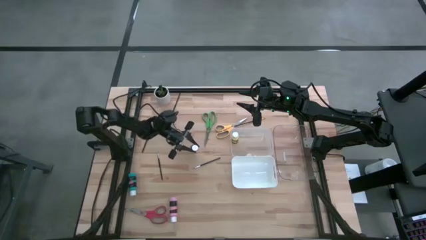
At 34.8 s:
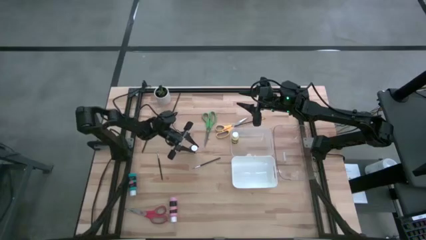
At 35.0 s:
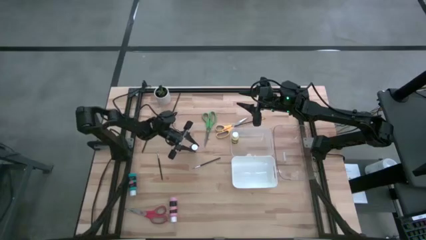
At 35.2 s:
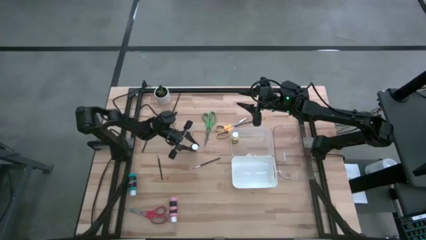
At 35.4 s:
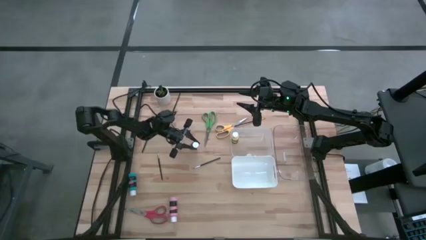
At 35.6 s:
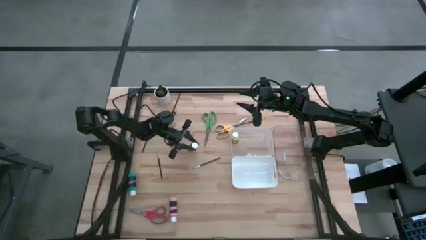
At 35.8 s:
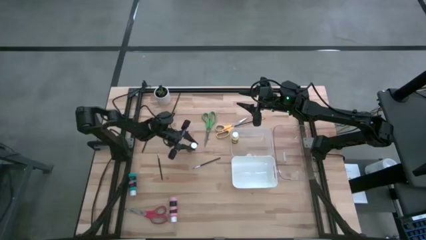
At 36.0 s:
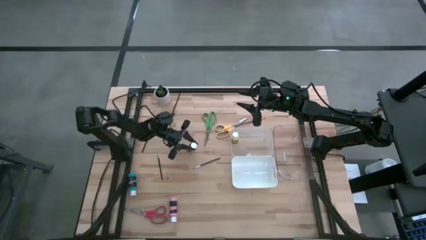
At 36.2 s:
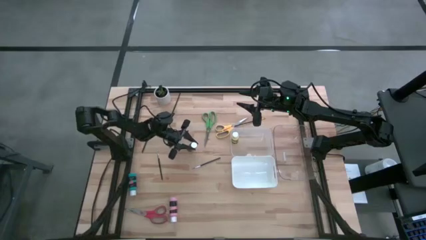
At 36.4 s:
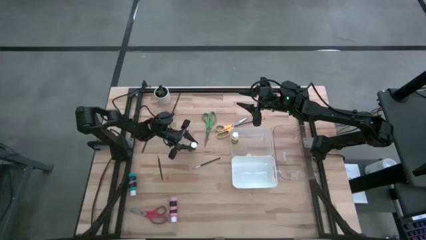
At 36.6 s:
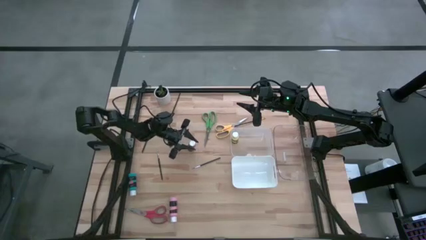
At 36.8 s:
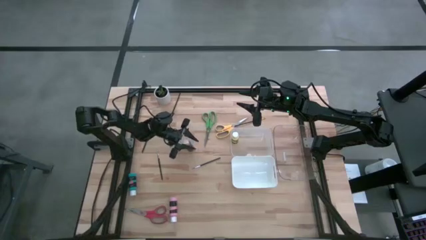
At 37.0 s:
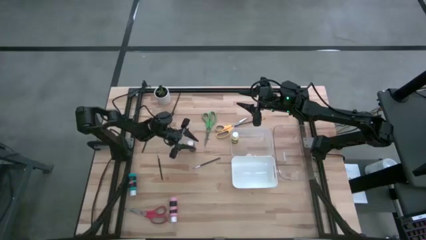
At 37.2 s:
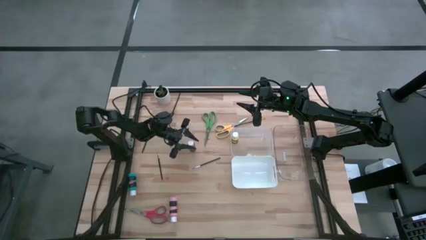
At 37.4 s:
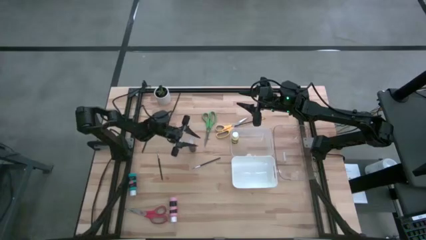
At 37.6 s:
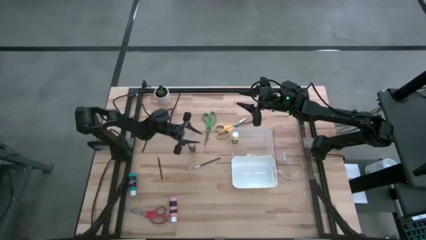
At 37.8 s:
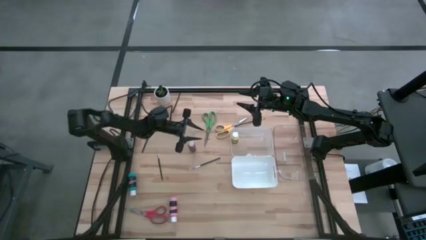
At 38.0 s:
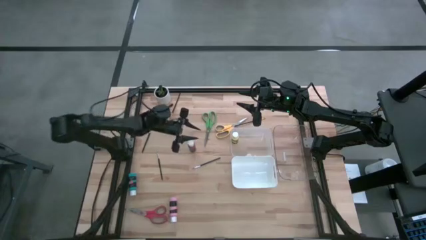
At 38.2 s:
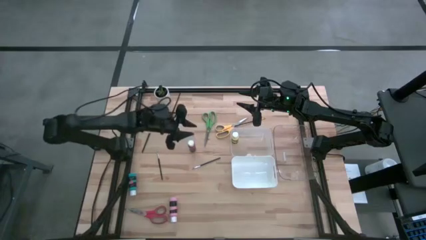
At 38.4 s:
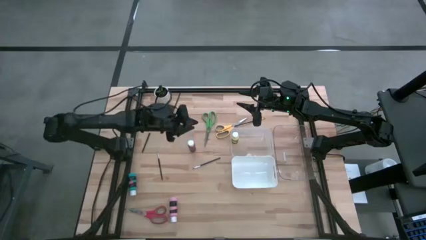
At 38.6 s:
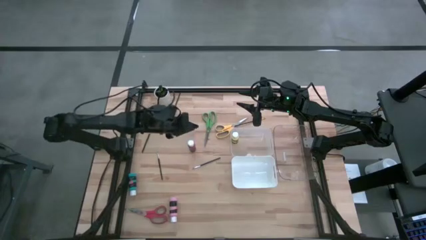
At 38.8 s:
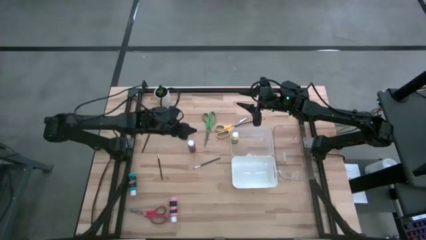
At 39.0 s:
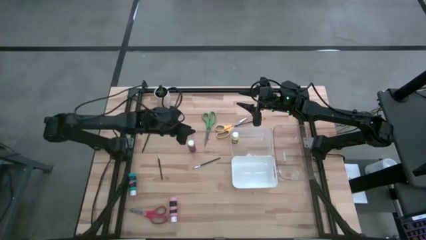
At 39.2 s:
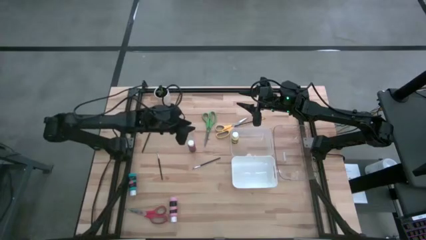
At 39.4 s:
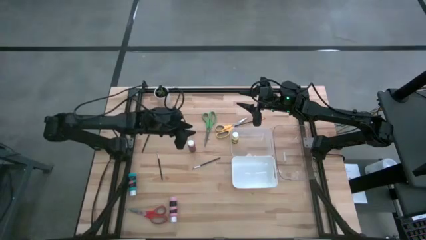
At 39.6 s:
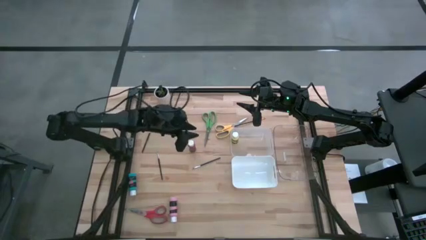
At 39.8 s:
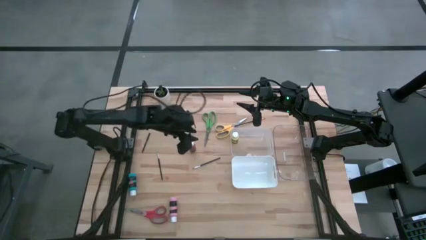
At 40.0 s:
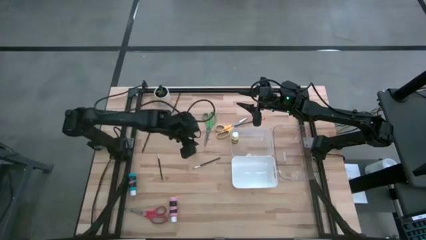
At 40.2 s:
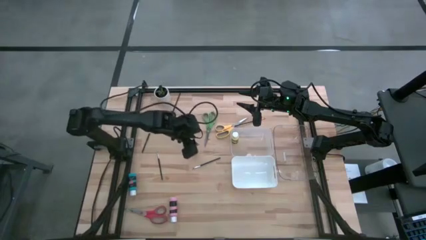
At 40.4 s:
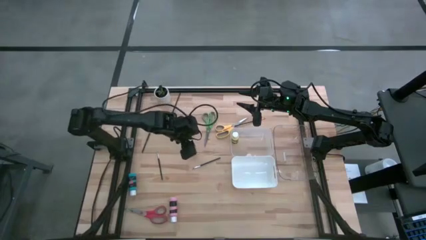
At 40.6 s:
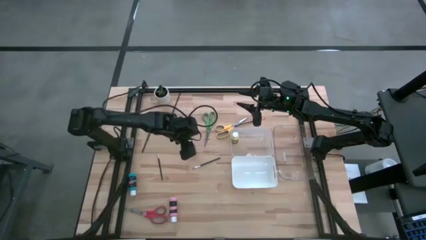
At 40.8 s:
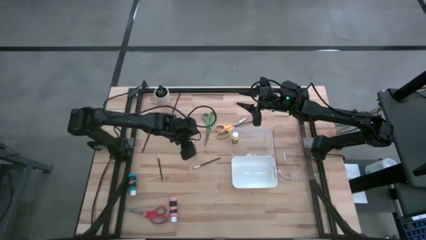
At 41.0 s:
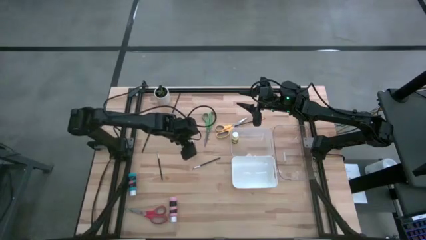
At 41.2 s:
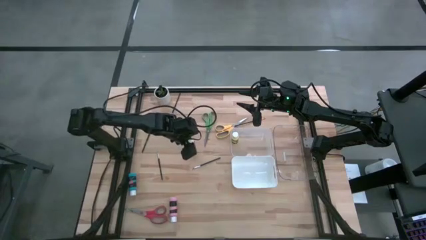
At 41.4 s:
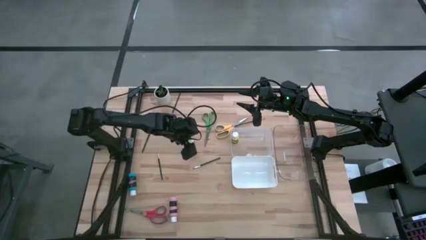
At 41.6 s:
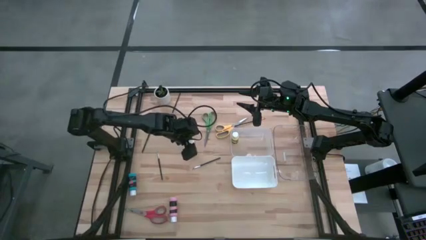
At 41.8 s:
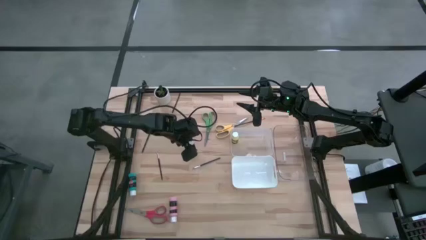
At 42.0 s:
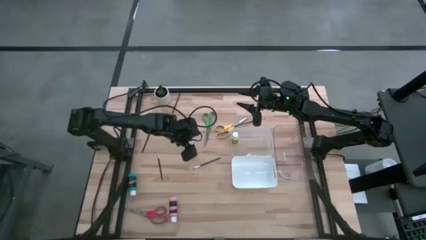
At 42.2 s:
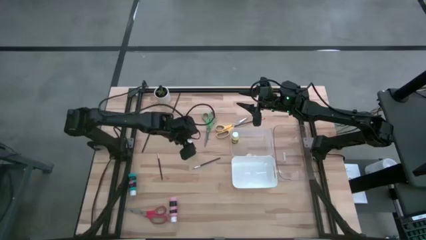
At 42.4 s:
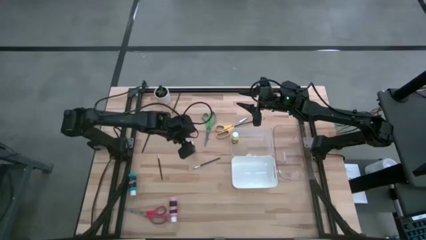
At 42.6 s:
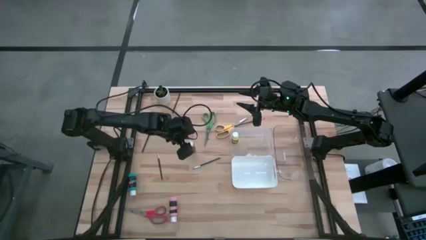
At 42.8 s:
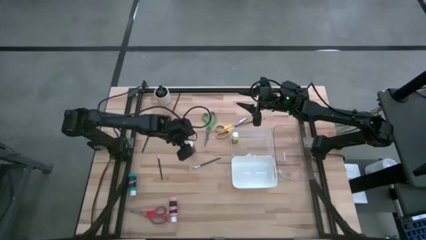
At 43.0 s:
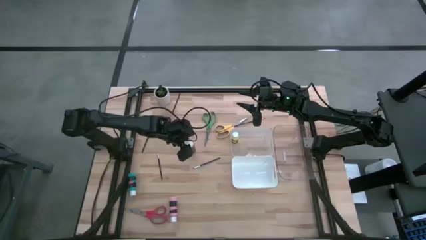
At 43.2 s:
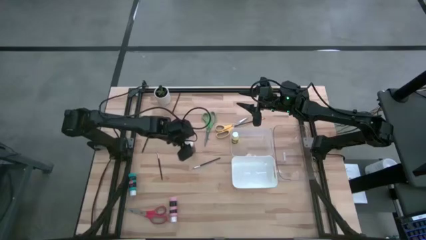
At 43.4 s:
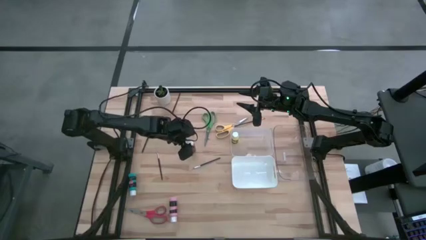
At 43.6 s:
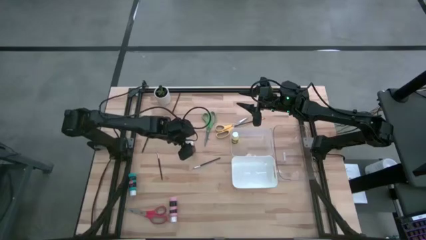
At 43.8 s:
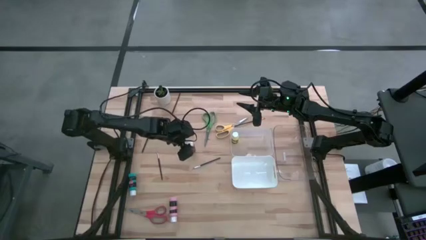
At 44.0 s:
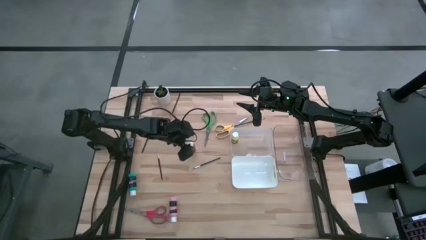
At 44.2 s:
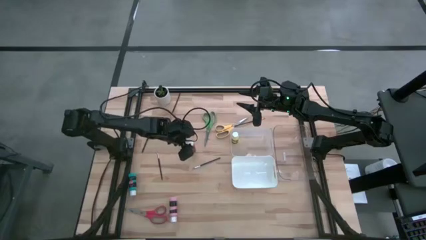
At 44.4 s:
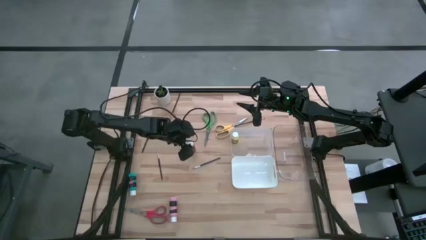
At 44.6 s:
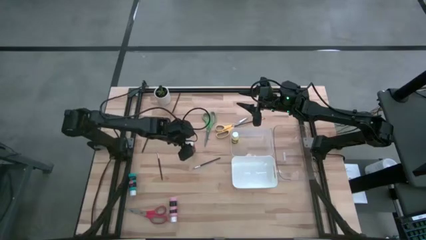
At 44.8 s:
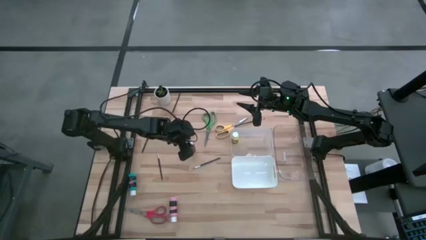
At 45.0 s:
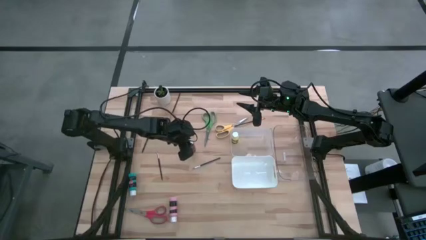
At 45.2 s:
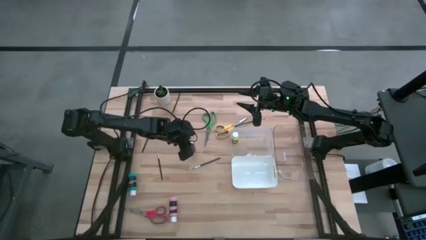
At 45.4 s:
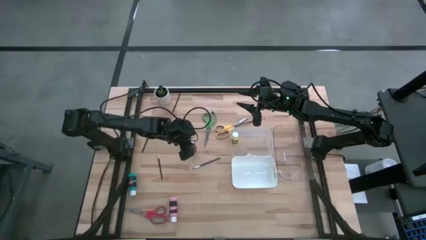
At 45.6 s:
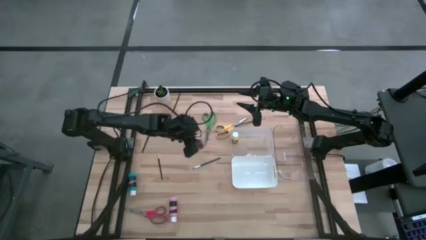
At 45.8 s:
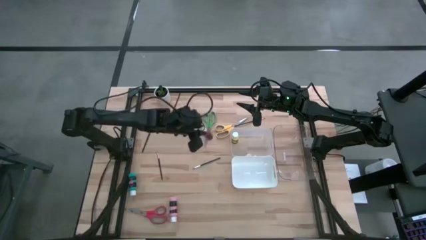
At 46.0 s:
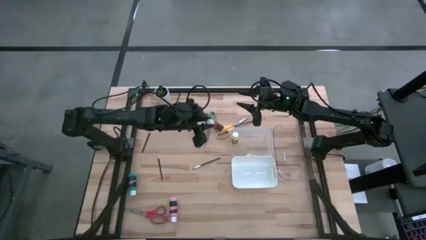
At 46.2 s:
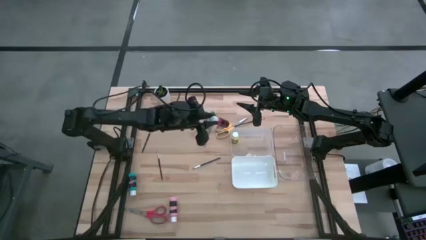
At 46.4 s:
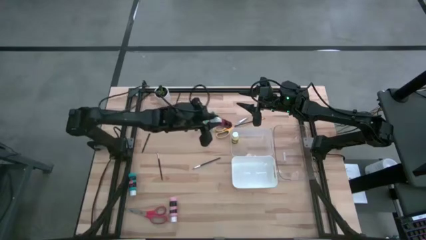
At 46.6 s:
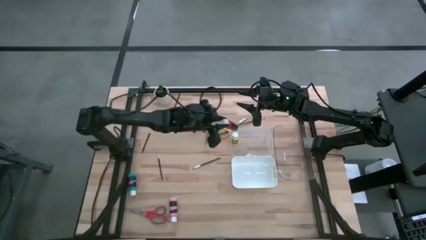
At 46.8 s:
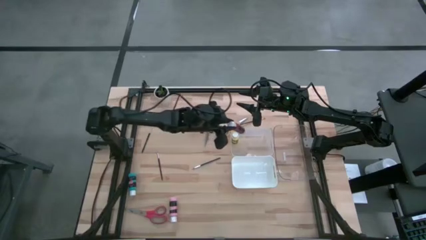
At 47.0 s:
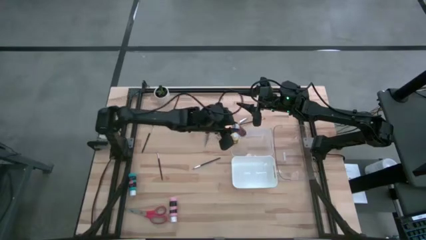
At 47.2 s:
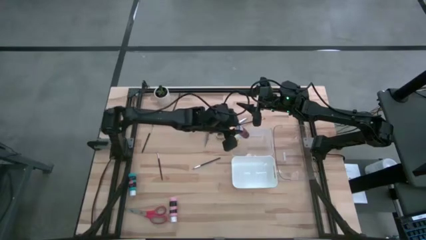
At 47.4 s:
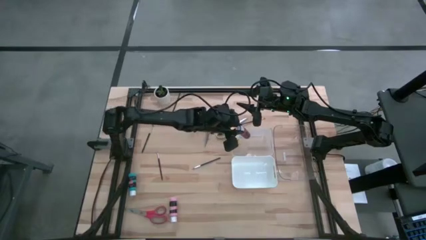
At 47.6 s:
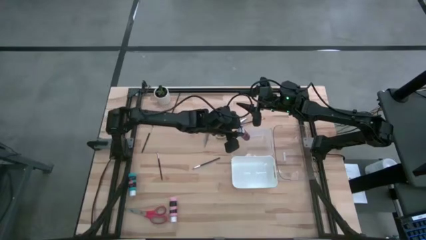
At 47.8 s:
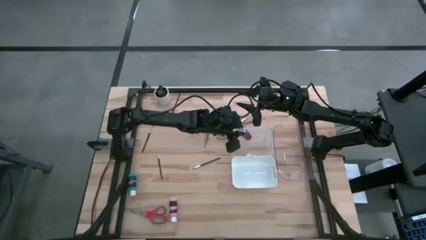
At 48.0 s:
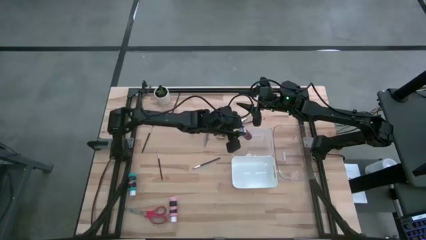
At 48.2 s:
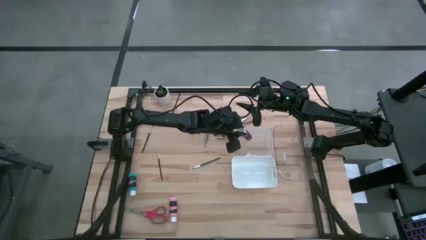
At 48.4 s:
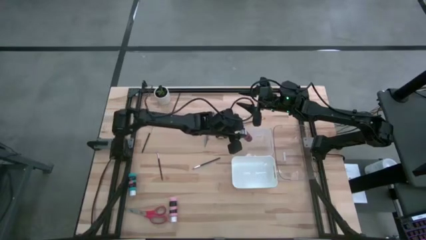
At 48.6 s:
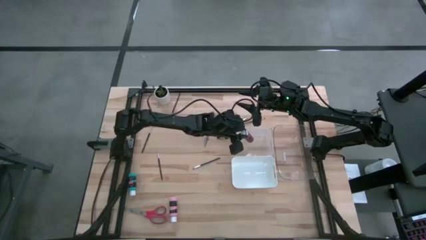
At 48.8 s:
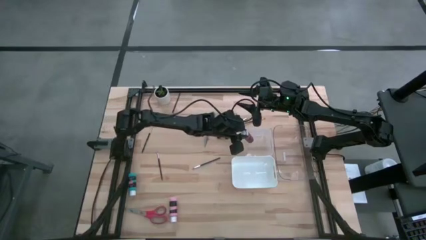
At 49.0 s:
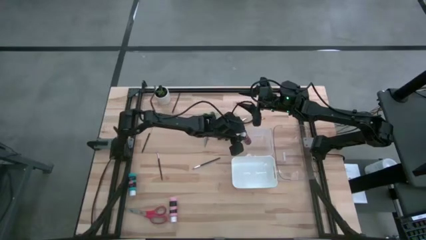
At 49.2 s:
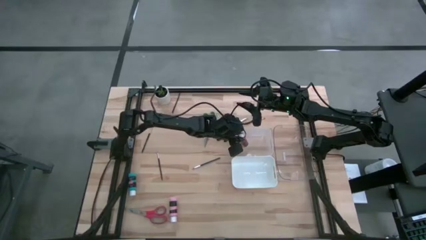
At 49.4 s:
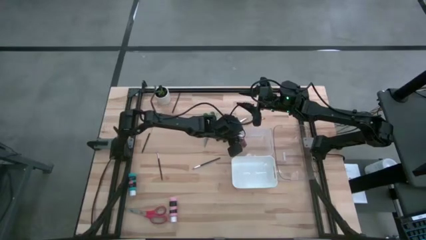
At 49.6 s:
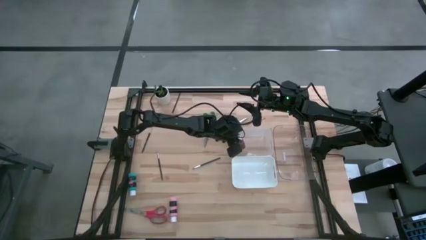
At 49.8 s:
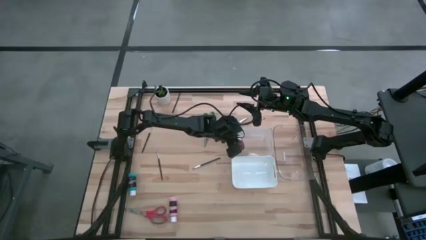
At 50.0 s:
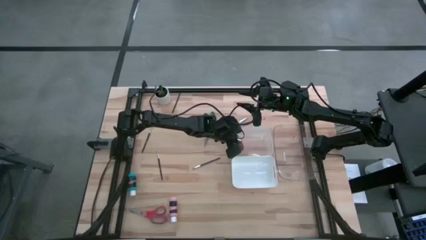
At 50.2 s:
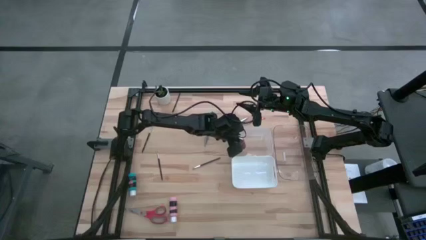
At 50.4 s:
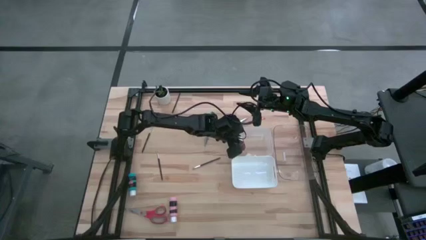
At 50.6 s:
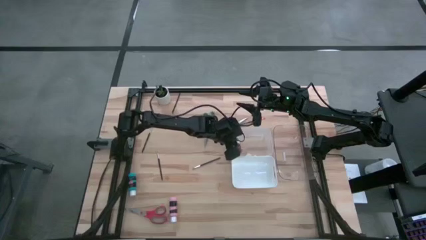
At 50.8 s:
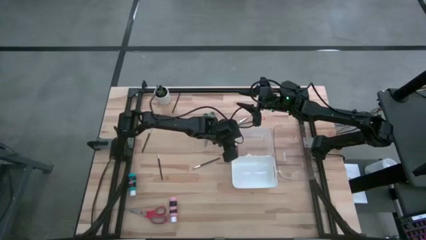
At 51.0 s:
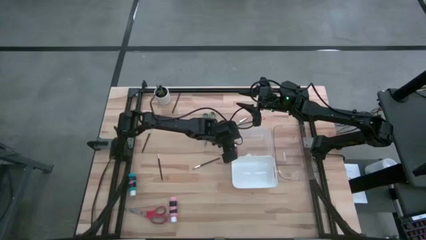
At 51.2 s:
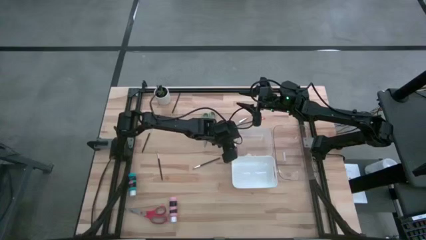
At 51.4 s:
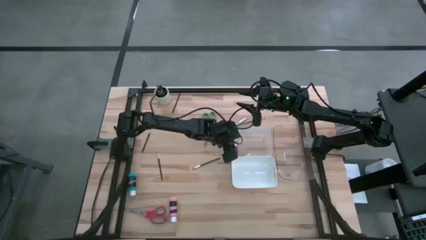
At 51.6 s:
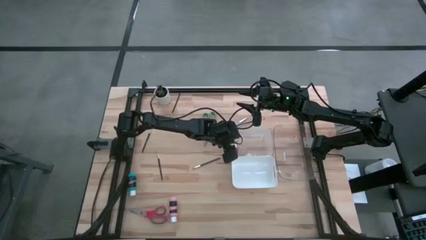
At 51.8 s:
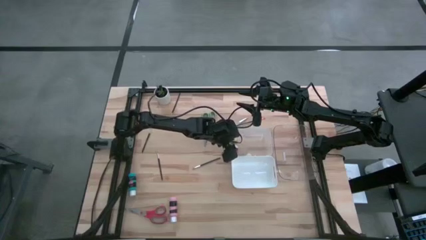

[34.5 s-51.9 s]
Task: Pick & Place Paint Supplies
Put the red paint bottle into the left transparent bin

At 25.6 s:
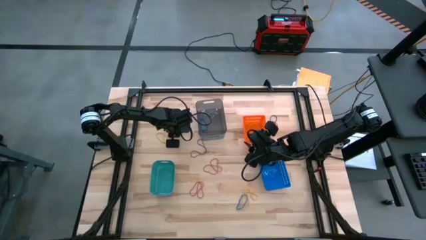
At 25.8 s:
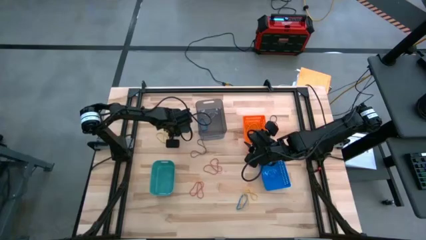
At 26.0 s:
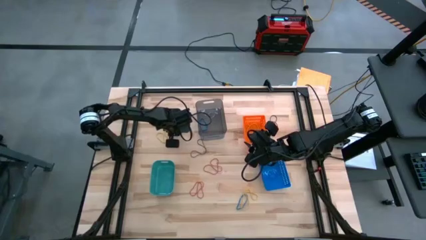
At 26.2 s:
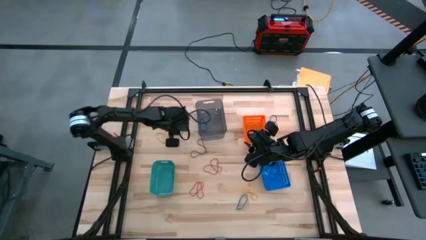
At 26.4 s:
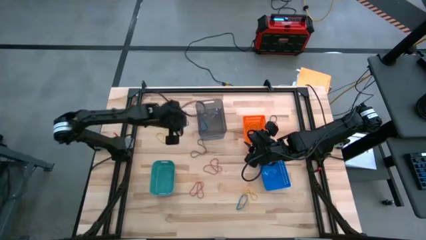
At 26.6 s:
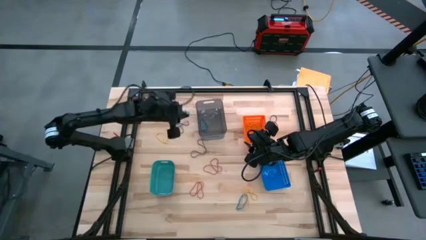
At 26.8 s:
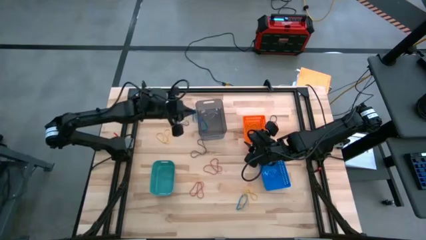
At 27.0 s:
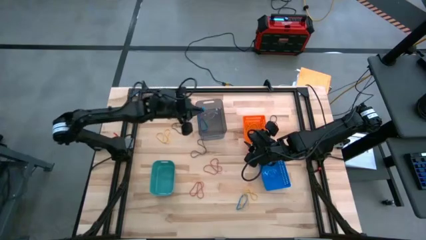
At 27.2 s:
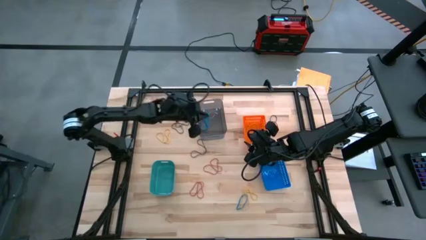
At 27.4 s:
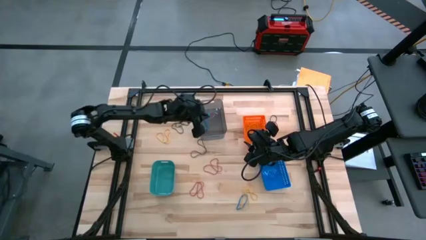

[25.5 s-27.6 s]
Task: Sort rubber bands into baskets
Put the blue rubber band into the black bin
